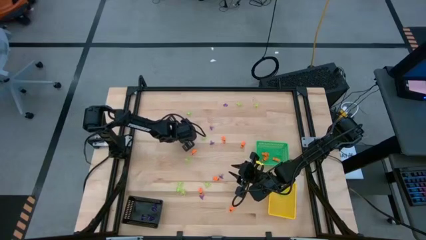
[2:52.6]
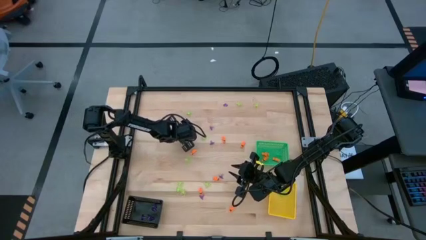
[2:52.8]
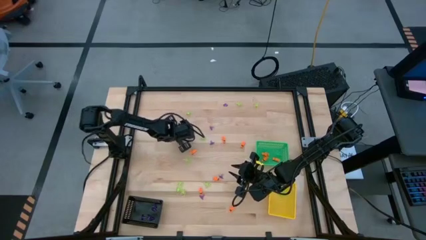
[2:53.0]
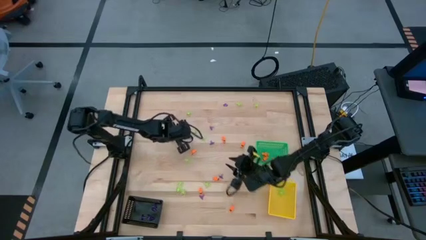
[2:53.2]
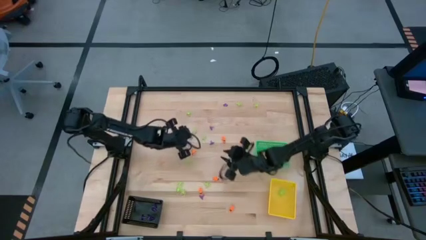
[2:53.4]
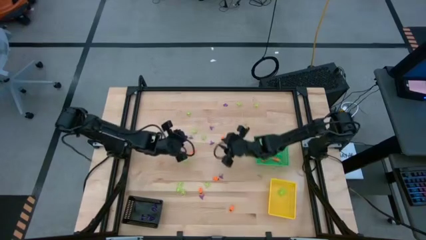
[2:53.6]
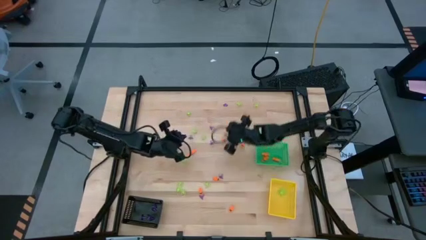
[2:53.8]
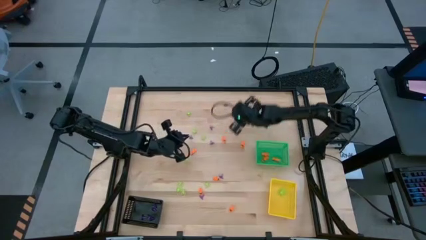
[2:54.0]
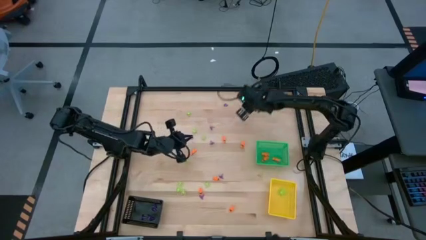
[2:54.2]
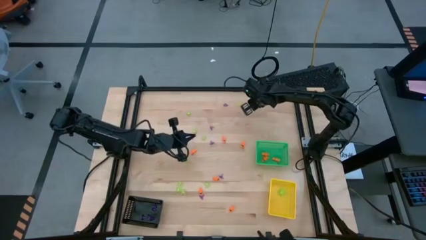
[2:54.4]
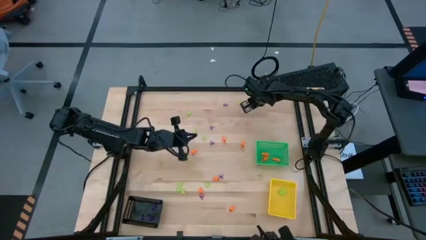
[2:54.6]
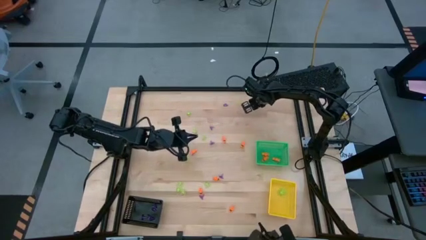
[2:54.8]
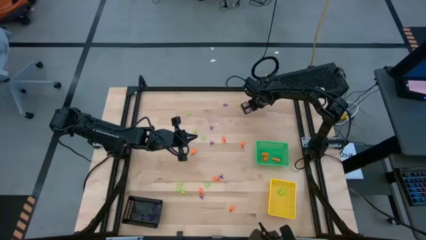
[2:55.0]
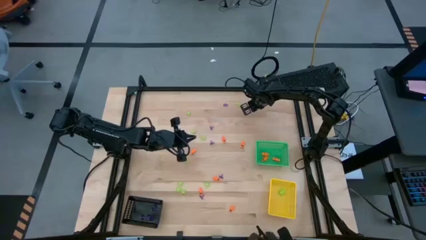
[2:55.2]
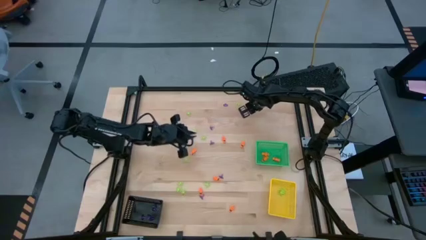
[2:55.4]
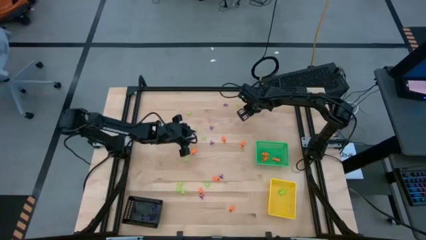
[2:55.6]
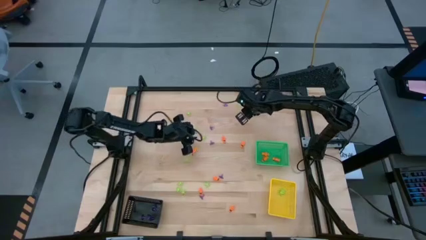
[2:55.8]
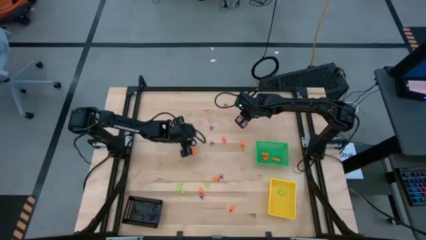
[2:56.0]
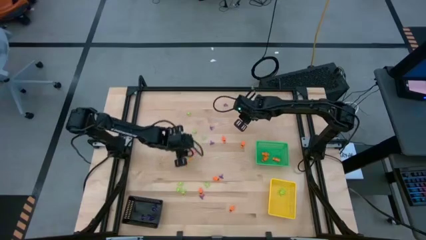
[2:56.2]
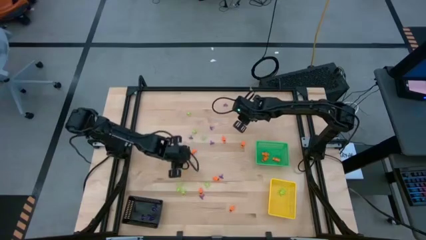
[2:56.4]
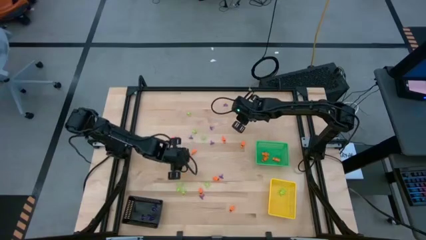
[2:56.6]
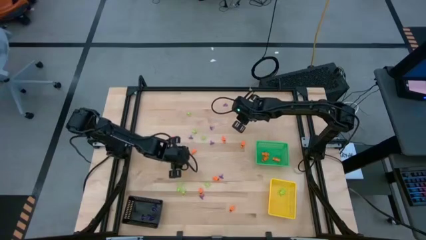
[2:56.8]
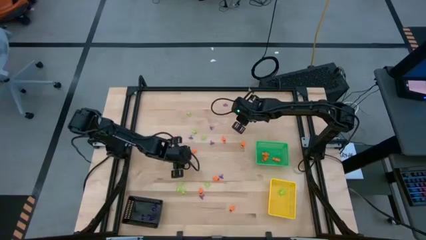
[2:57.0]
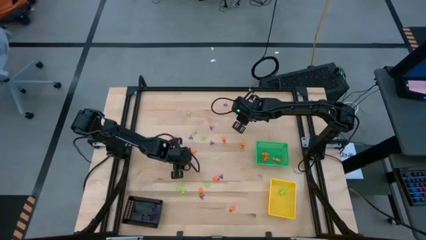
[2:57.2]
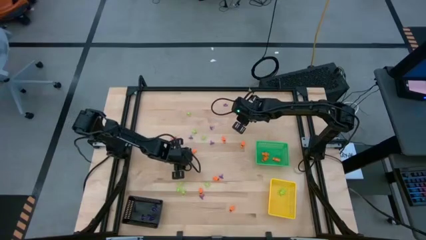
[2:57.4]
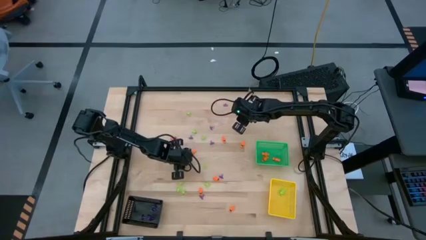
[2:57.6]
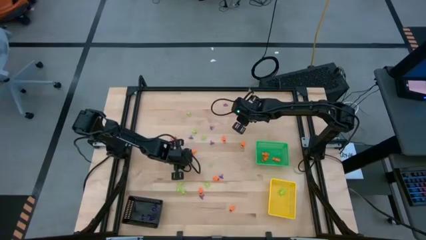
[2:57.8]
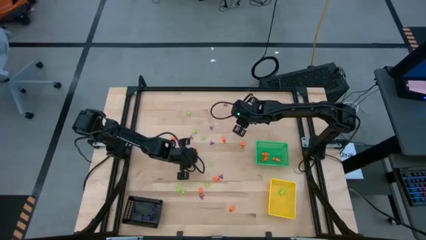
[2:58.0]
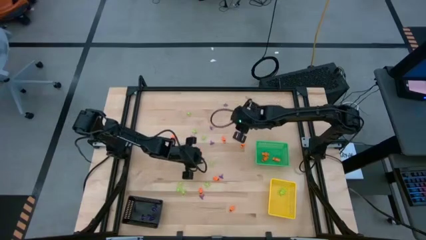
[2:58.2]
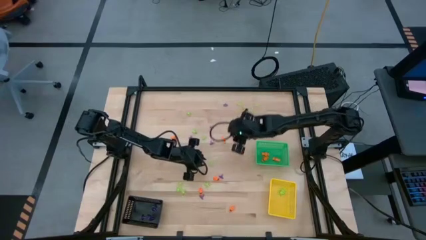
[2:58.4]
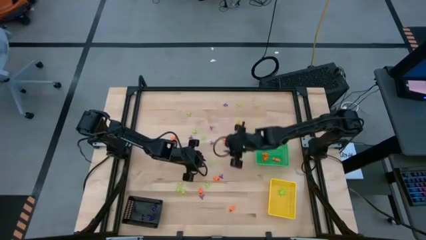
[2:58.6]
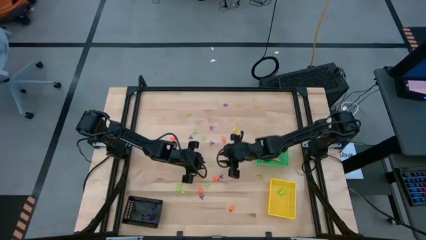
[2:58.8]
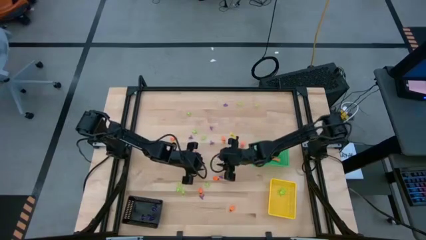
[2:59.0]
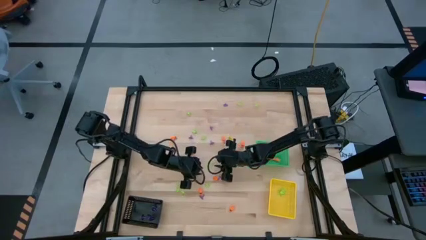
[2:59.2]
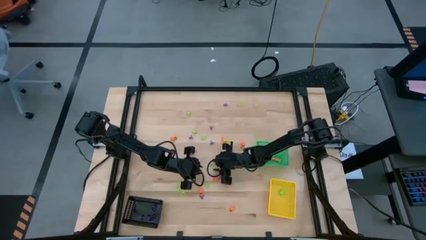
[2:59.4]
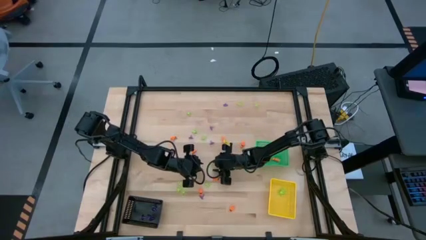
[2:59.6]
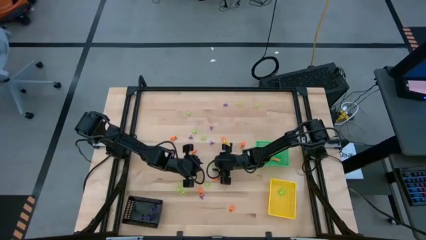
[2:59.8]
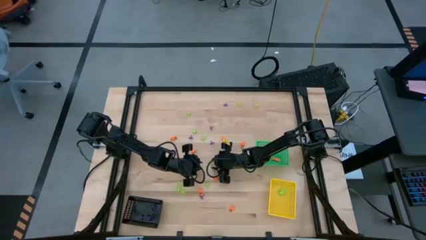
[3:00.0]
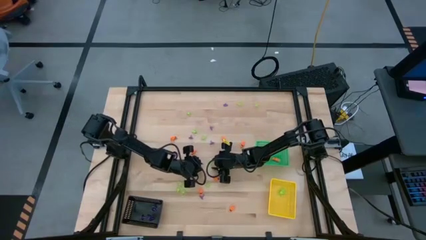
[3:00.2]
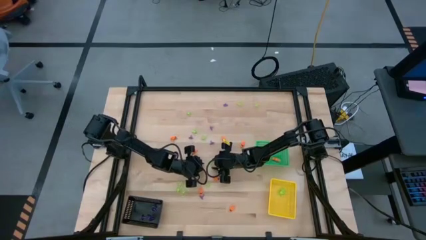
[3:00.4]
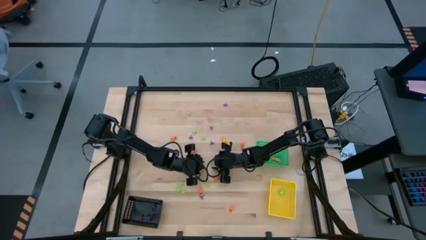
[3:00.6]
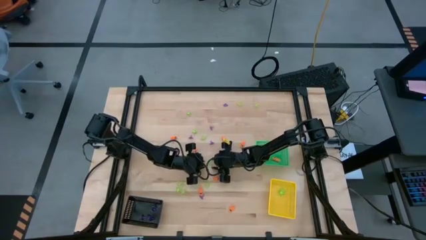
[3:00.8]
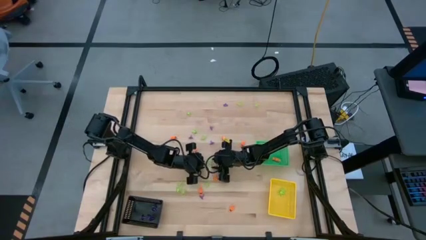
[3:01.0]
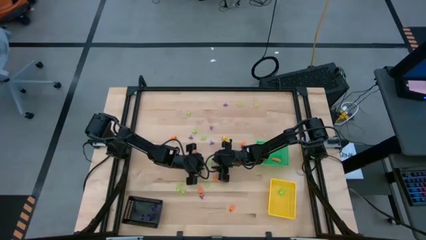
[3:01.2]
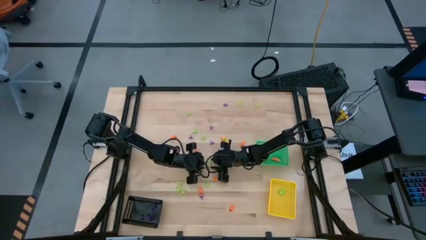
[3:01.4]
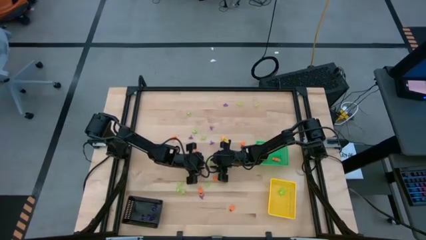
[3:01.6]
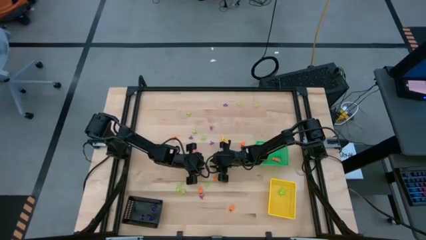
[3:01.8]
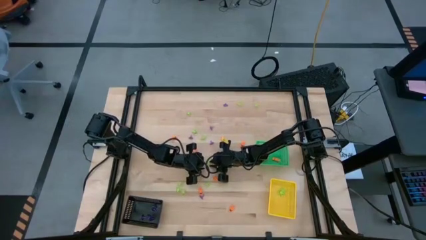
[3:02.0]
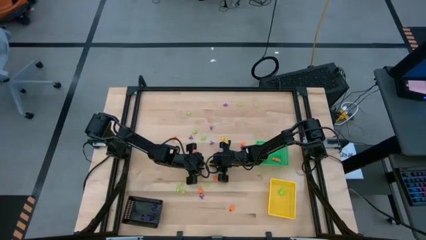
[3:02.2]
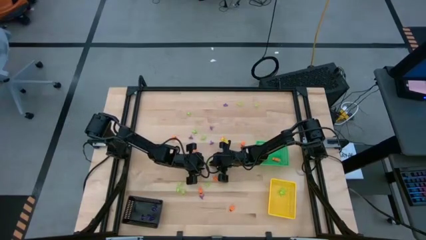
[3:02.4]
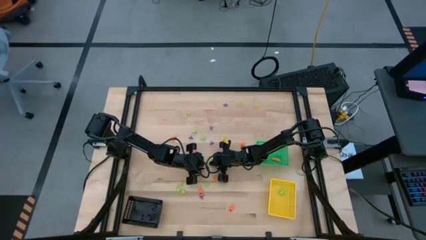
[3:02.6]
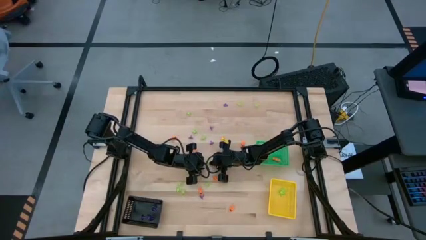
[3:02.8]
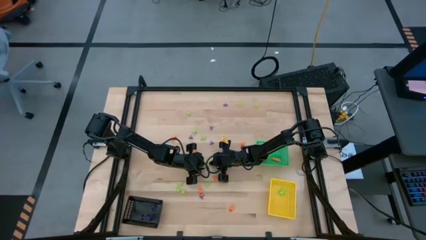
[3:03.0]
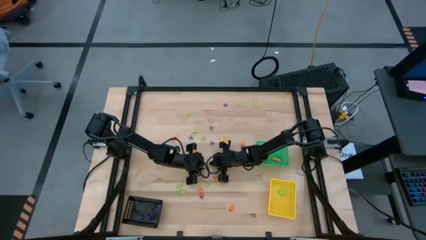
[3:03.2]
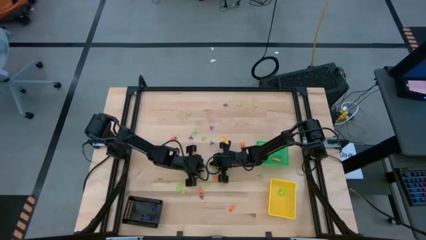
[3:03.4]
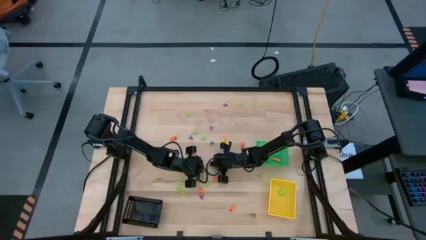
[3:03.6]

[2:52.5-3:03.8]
Task: Sort Halloween decoration
Put the green spider toy into the yellow bin

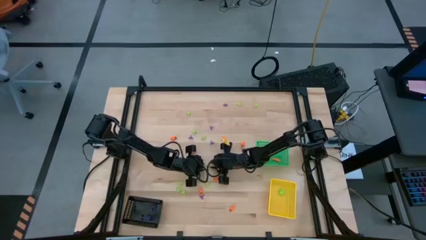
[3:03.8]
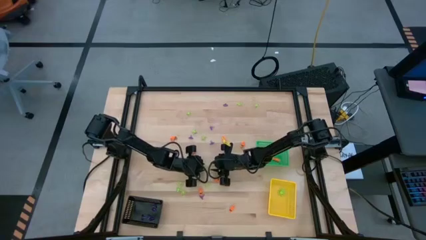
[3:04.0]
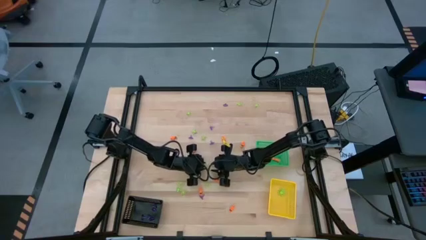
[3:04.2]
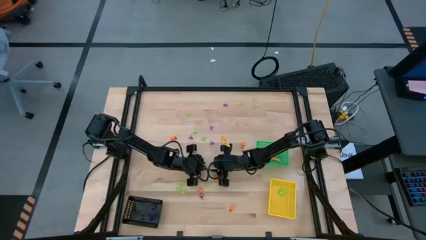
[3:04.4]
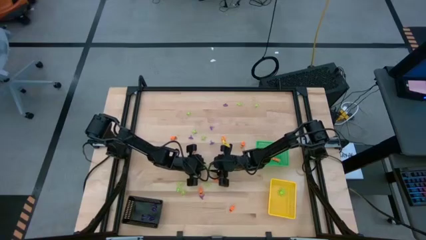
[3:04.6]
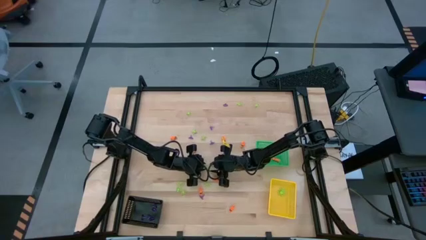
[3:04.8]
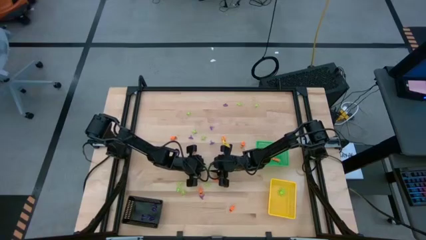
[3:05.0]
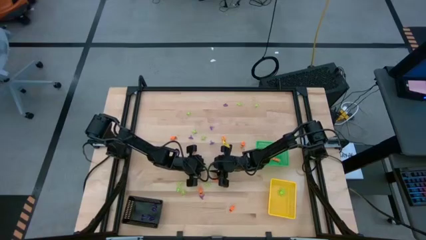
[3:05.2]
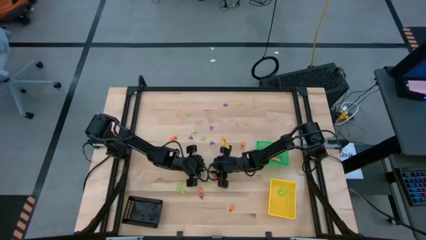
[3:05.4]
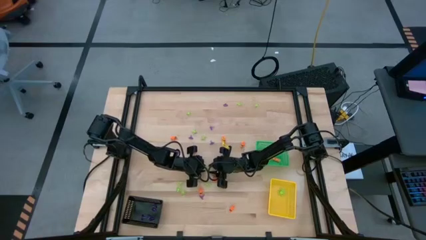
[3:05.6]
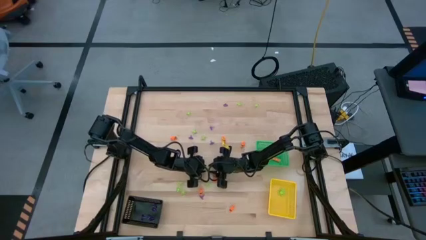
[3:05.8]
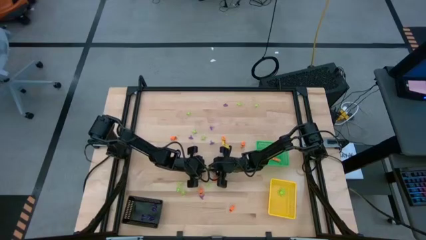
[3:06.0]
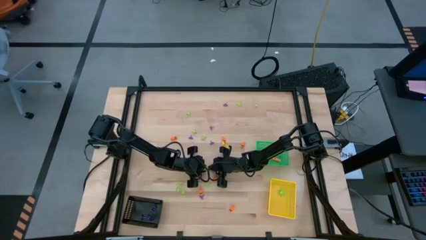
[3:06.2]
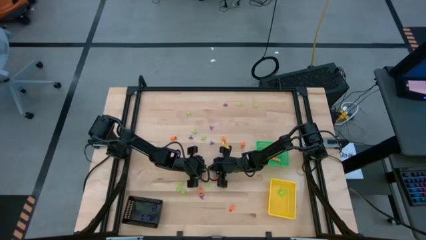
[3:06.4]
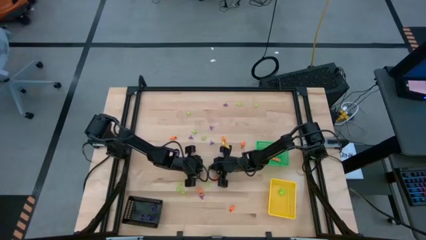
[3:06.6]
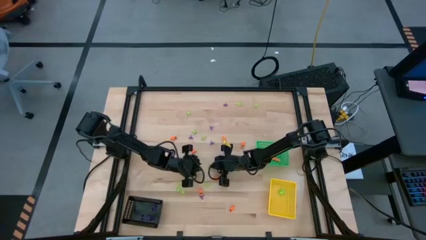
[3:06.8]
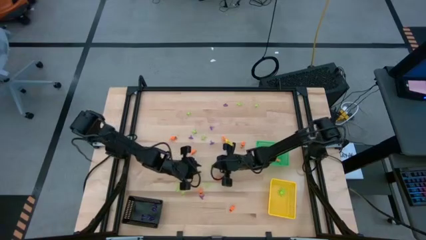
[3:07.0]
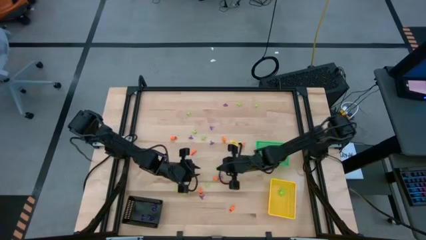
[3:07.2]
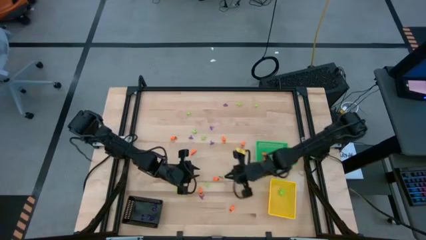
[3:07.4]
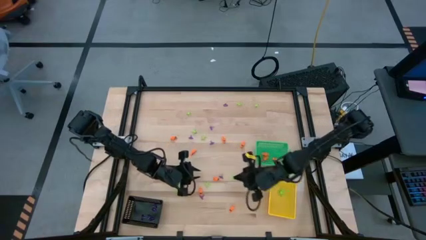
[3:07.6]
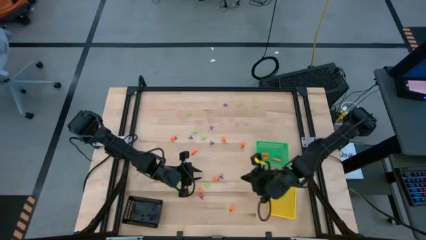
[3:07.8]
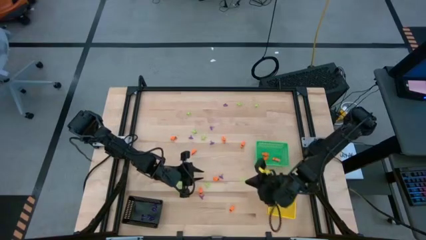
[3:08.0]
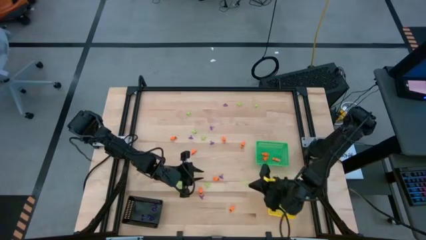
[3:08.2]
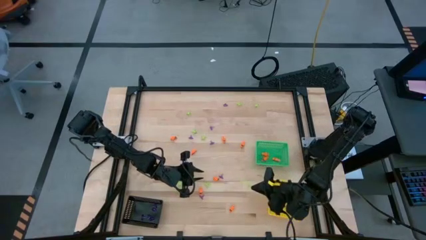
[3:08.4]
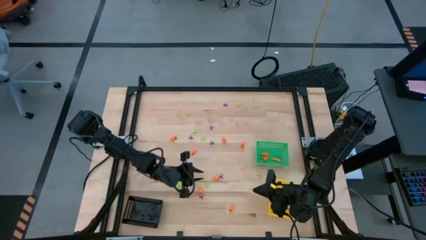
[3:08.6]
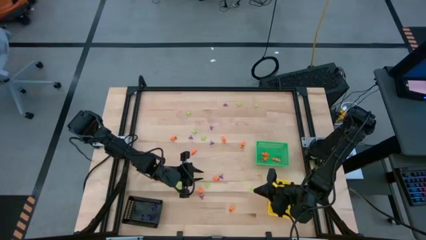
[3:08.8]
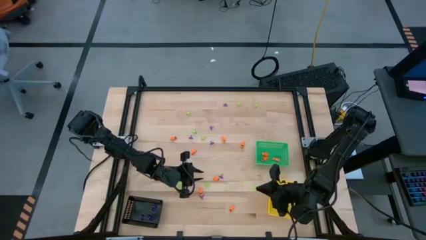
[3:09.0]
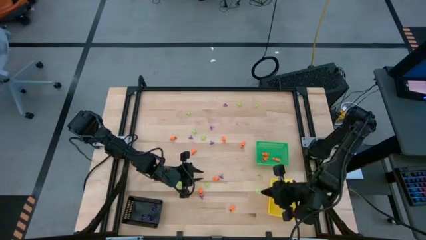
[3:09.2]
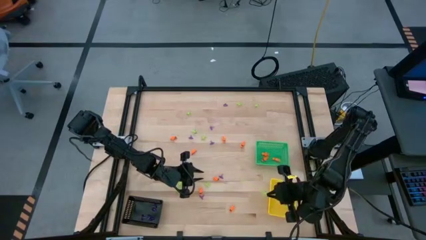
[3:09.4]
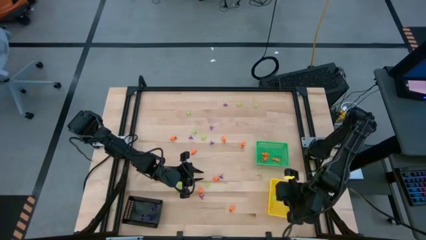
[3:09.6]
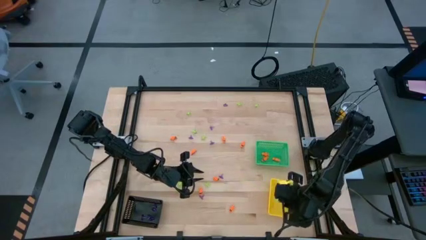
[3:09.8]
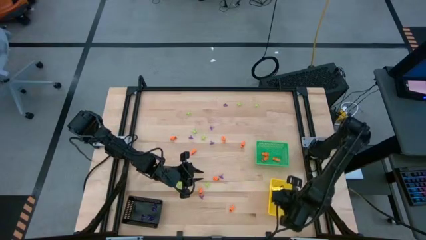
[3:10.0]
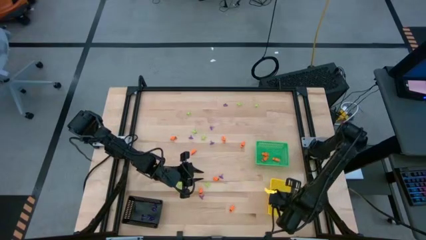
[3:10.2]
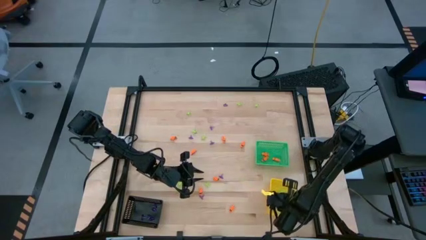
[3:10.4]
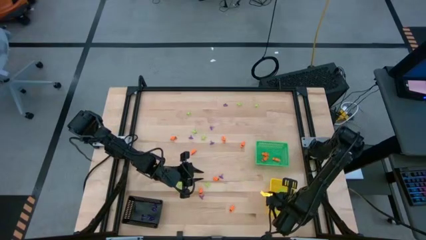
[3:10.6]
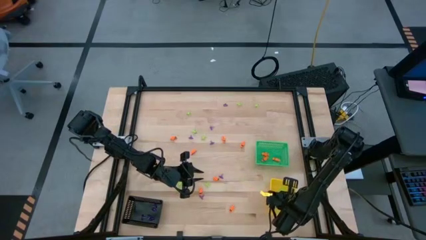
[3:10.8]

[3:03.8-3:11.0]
Put the green spider toy into the yellow bin
